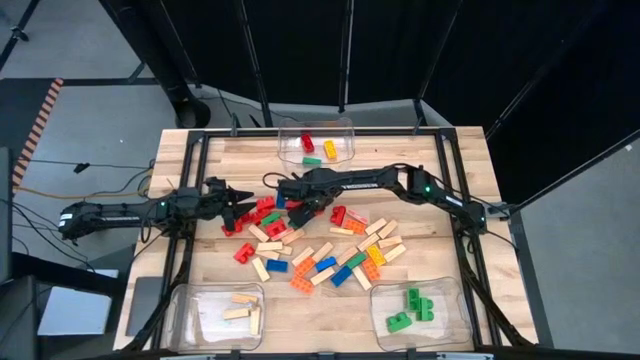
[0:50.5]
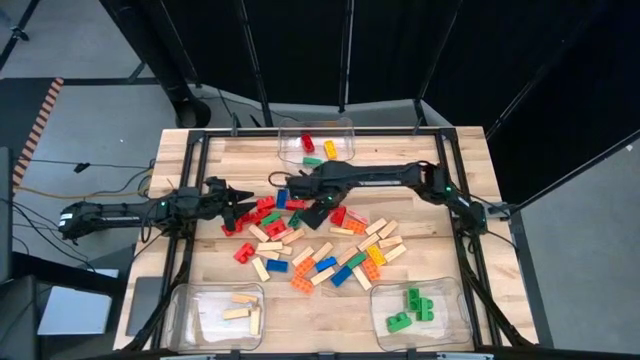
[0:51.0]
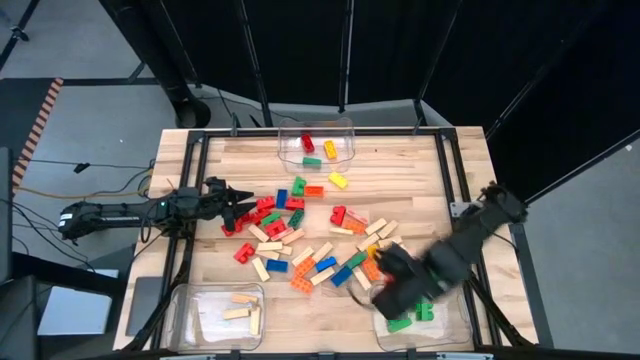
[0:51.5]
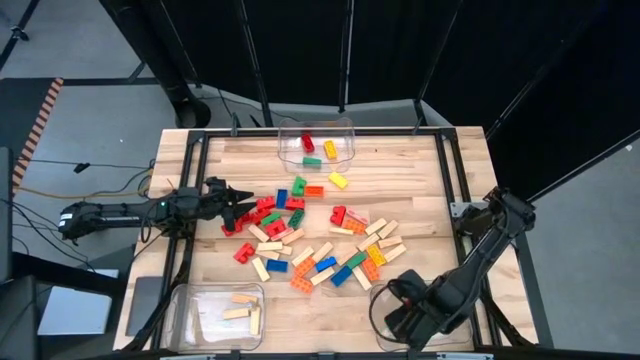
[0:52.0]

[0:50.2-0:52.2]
Task: Sort blocks by size
Put the 2-stud red game piece into the bottom right transparent bin

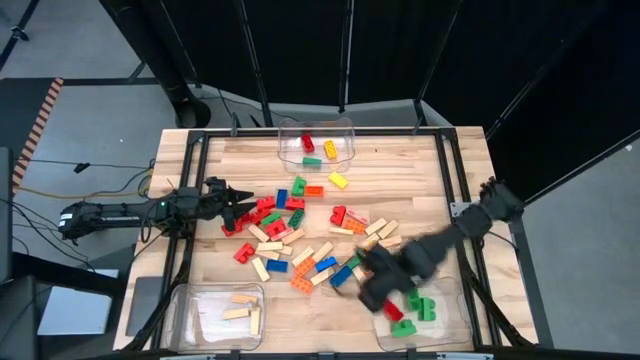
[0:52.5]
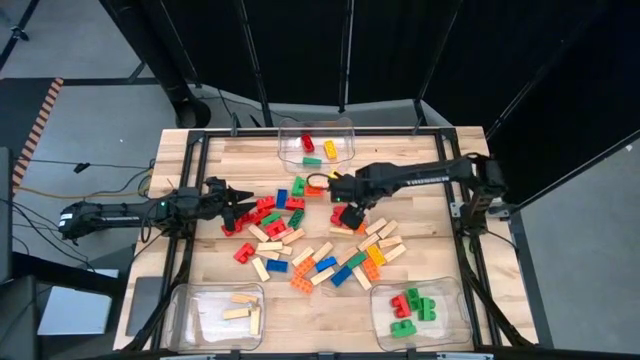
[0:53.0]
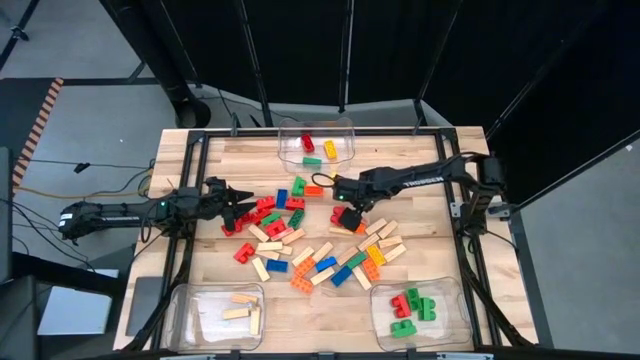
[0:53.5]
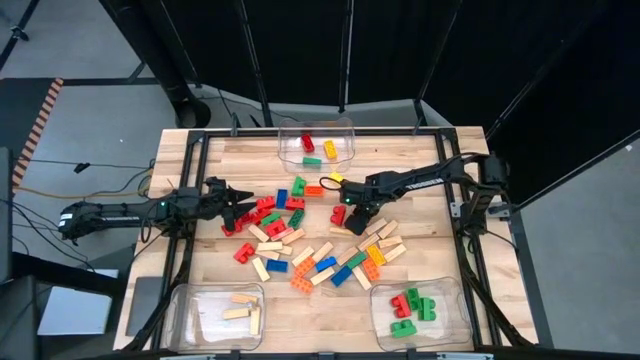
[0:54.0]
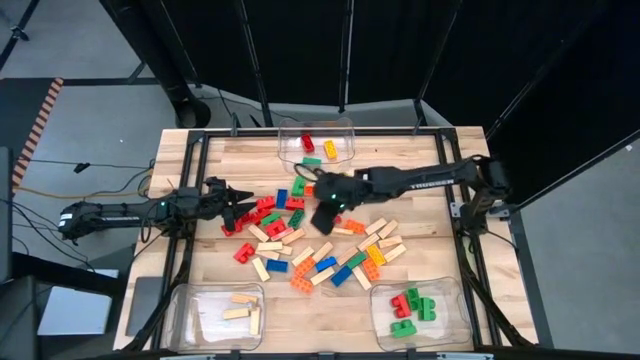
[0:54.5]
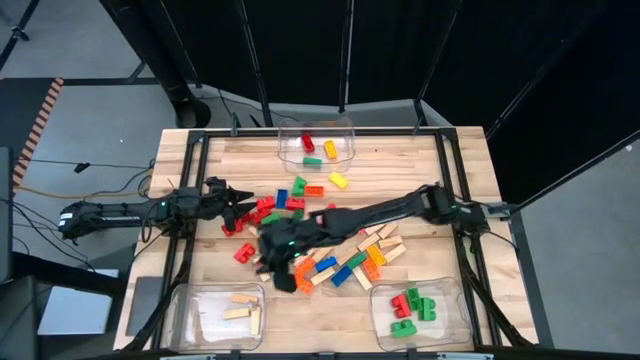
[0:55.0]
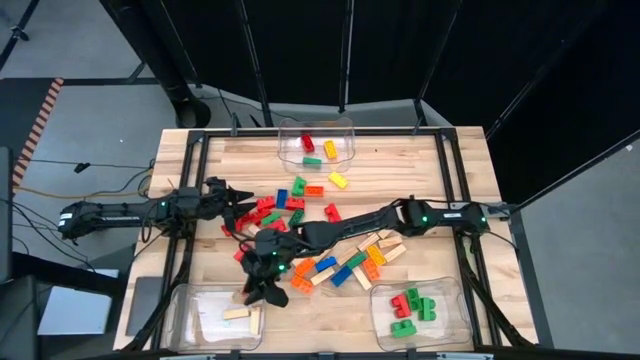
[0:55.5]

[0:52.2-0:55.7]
Put the white block into the bottom left transparent bin

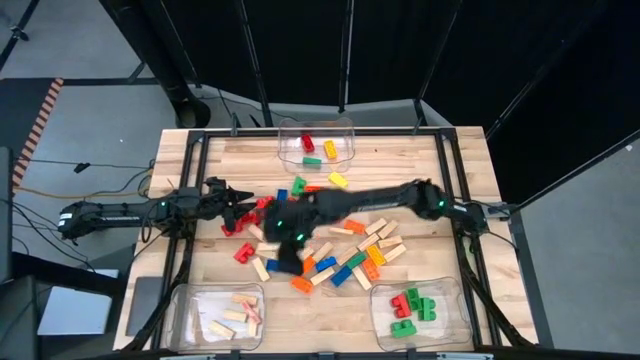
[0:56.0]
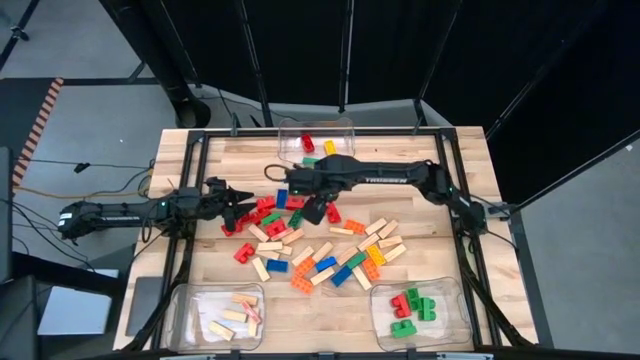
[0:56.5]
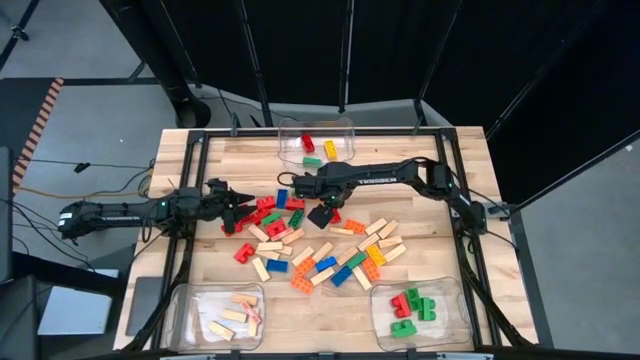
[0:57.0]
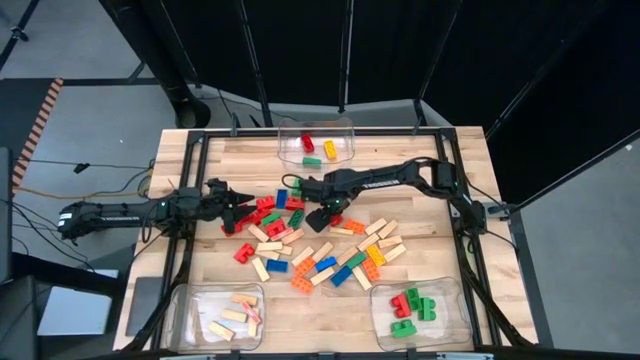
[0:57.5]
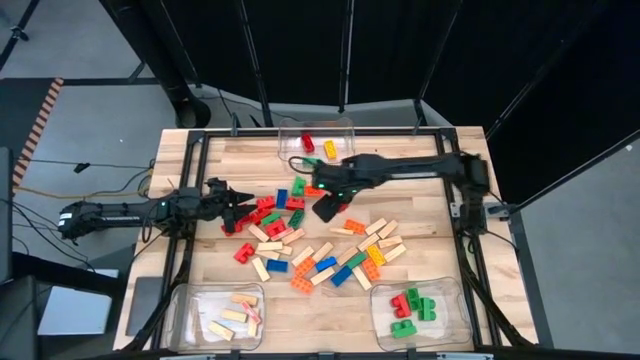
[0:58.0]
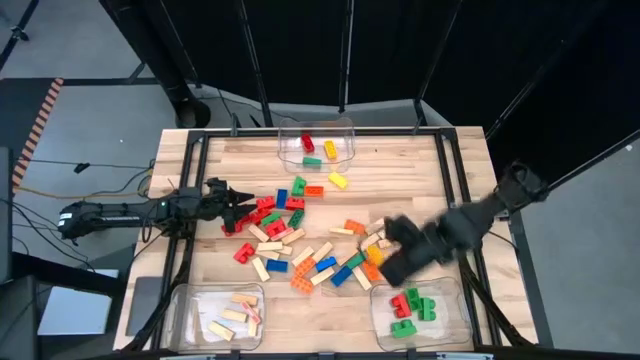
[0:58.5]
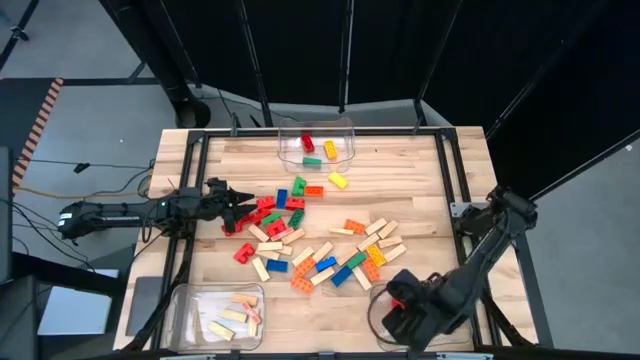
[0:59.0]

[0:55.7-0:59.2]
Put the 2-stud red game piece into the bottom right transparent bin

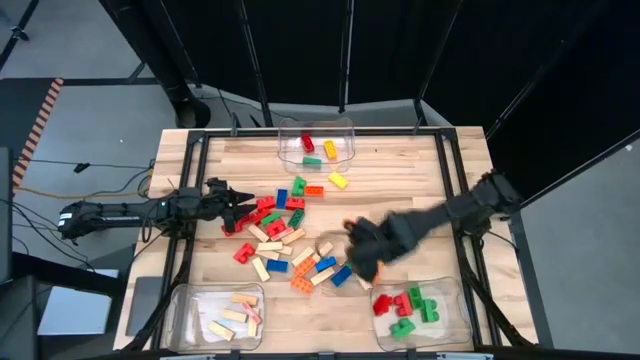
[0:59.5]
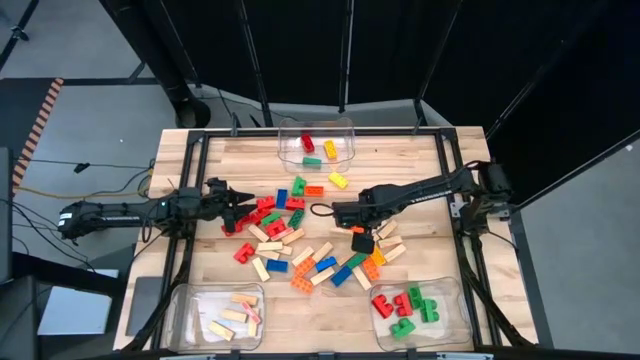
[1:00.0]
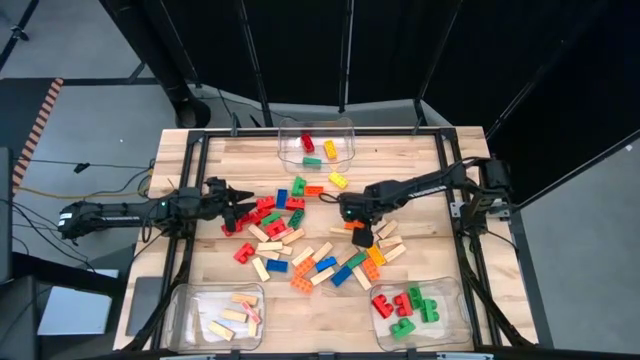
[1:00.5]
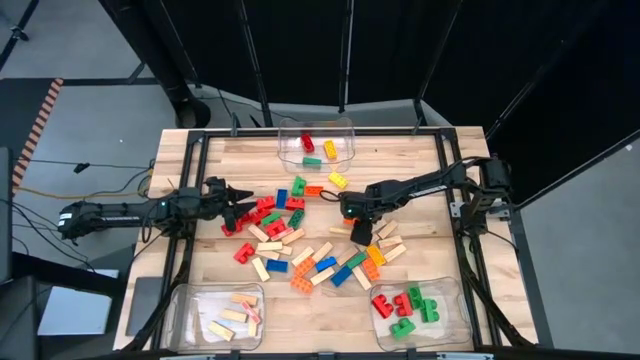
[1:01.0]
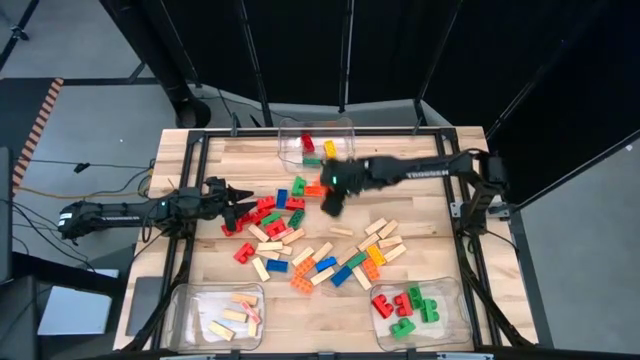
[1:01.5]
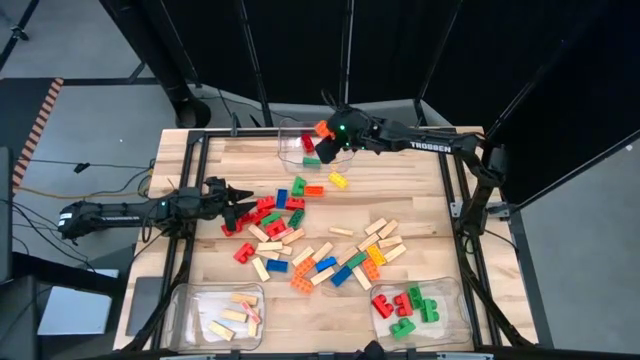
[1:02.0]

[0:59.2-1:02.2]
Put the 8-stud orange game piece into the top center transparent bin

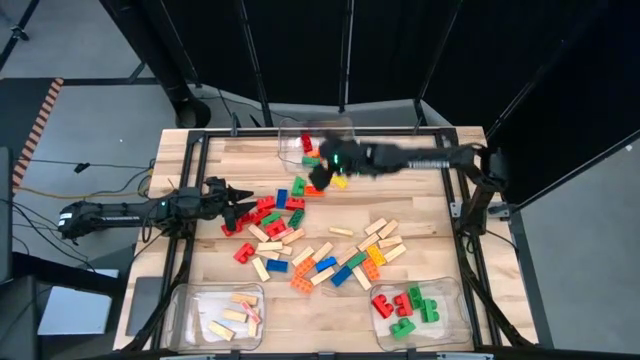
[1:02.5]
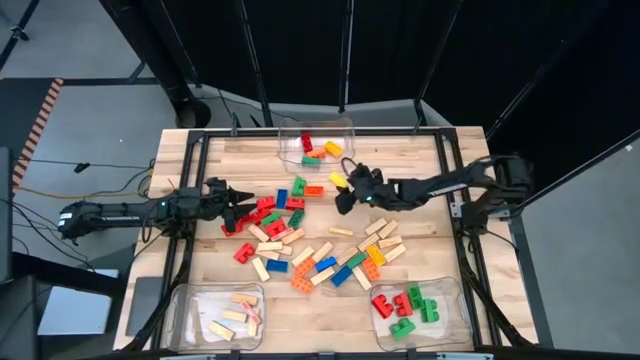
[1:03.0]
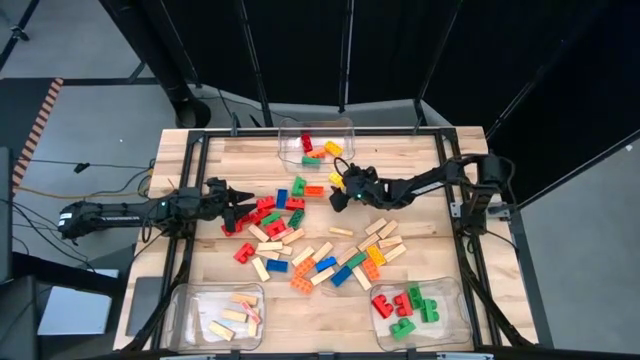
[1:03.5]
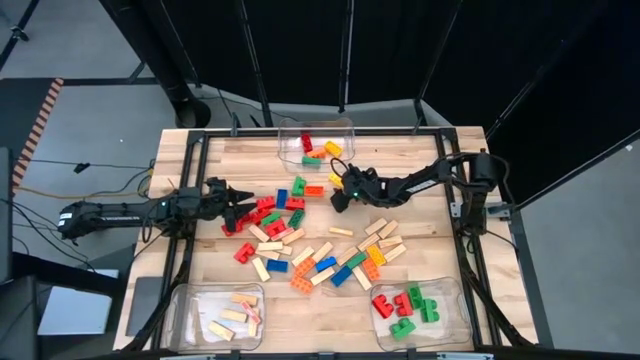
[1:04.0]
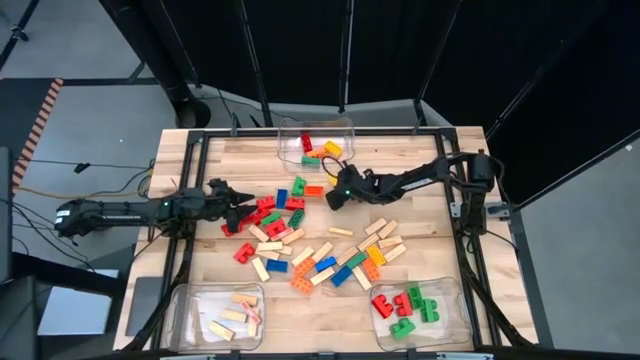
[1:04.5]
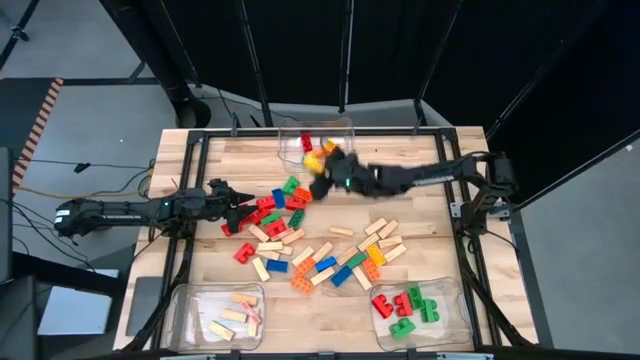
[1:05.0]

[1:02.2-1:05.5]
Put the yellow 8-stud game piece into the top center transparent bin

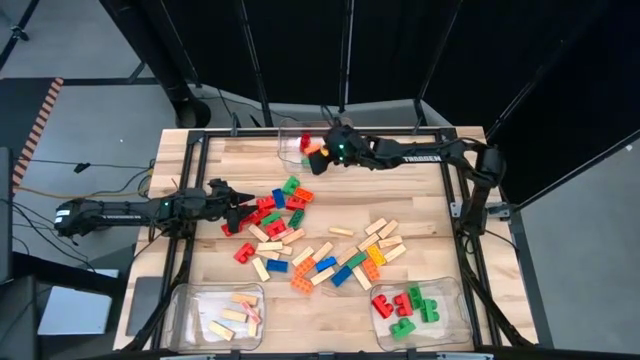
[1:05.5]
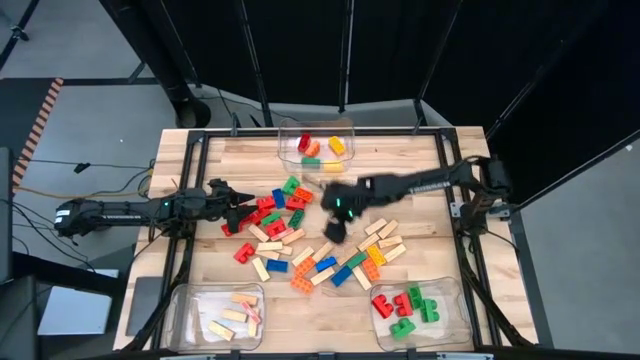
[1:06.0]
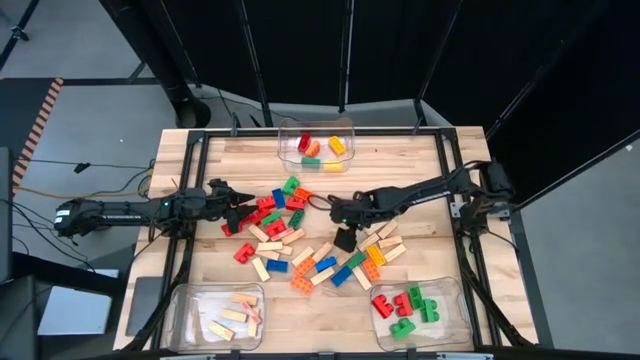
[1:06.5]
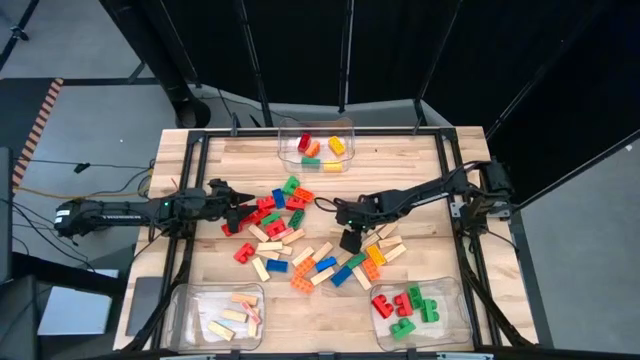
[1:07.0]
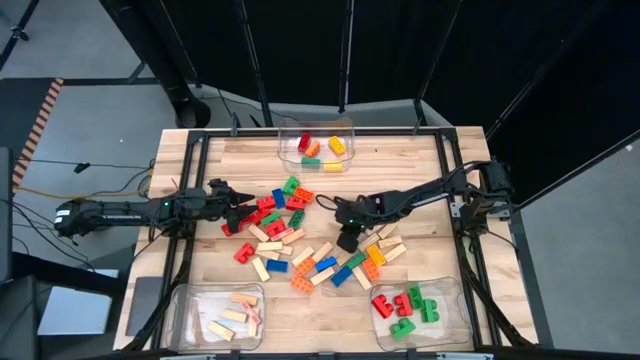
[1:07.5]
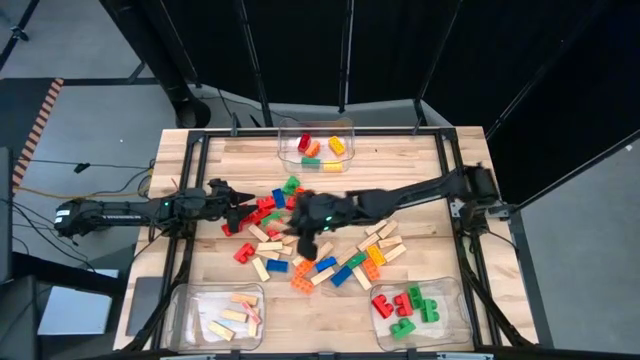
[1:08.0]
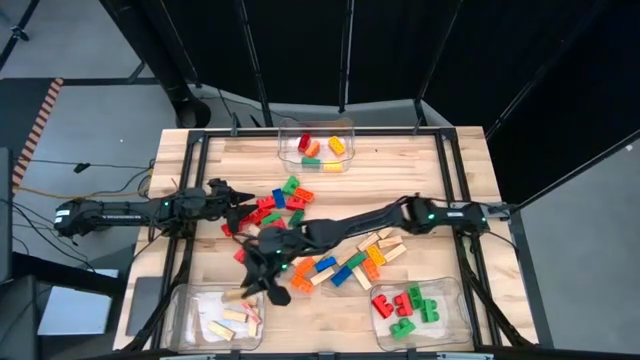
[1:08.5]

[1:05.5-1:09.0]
Put the white block into the bottom left transparent bin

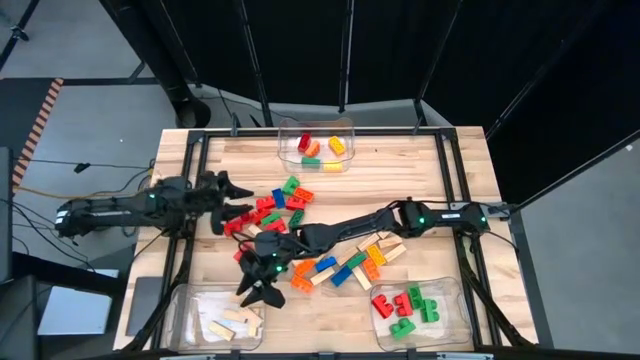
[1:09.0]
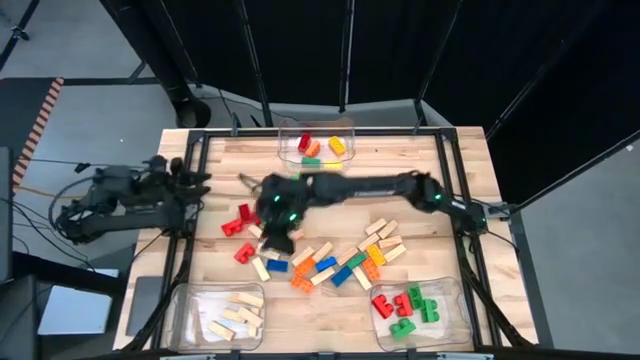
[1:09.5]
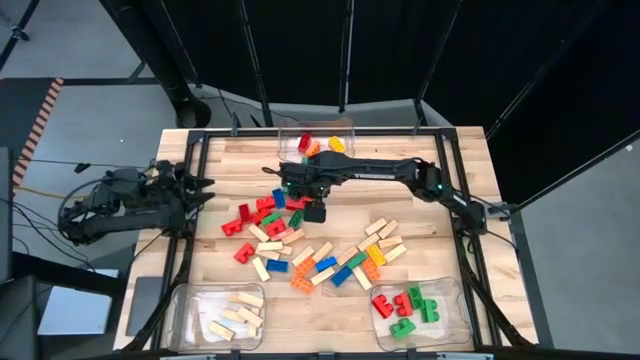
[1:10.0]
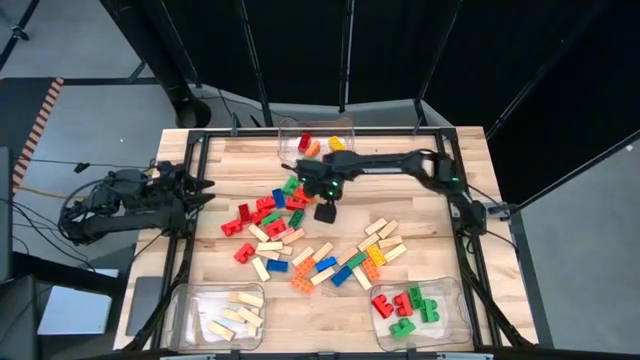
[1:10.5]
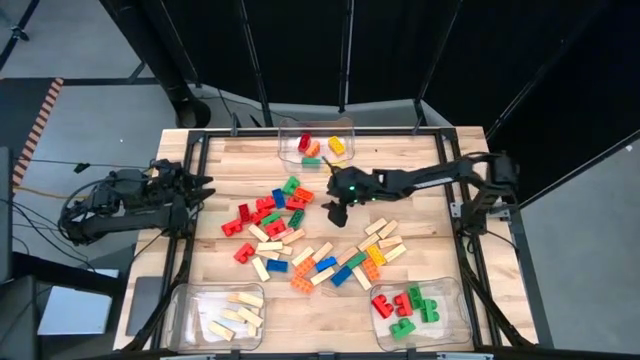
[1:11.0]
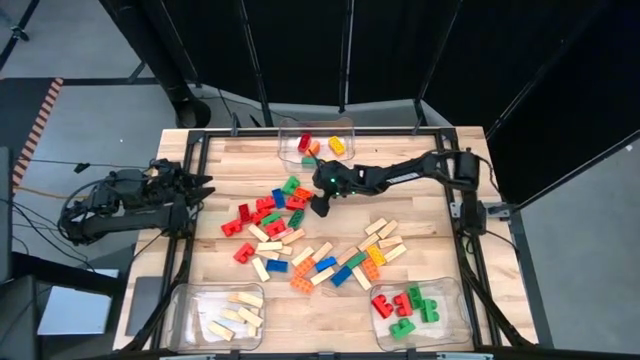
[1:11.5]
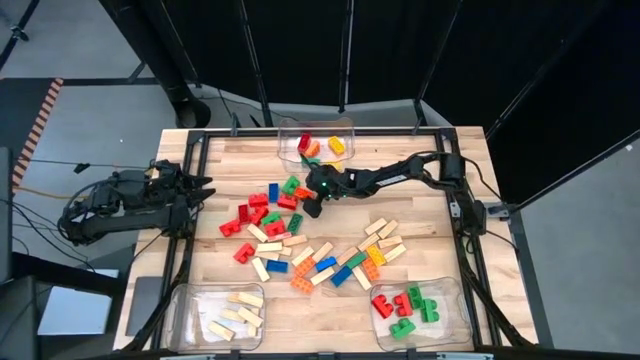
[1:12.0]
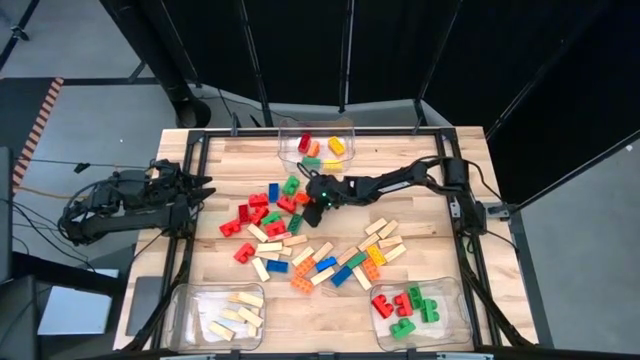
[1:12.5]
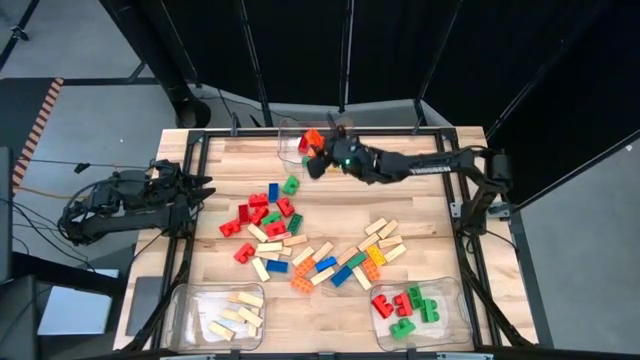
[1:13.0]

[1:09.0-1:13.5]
Put the 3-stud orange game piece into the top center transparent bin
